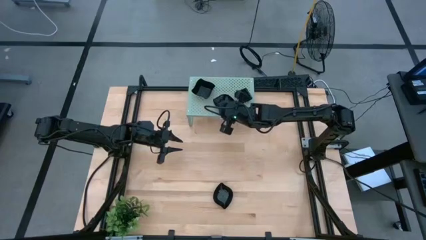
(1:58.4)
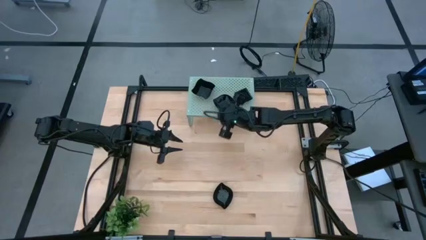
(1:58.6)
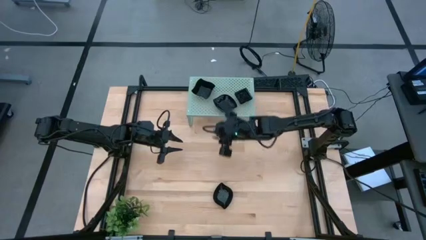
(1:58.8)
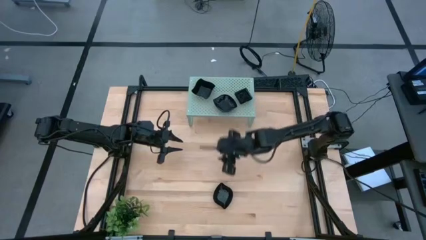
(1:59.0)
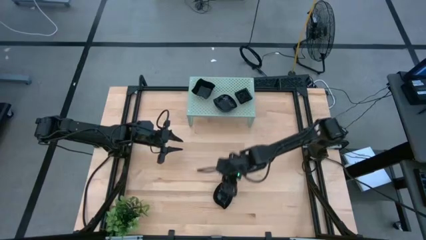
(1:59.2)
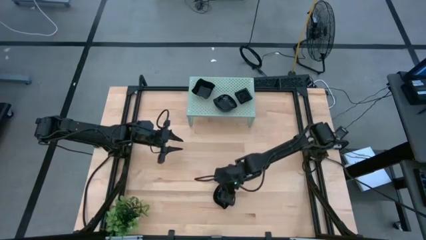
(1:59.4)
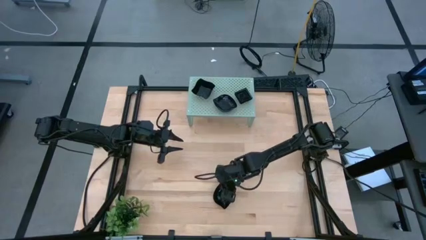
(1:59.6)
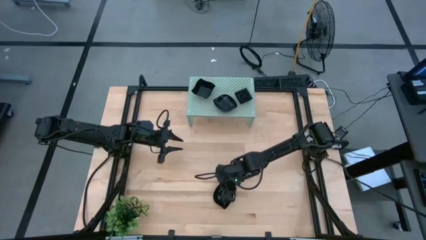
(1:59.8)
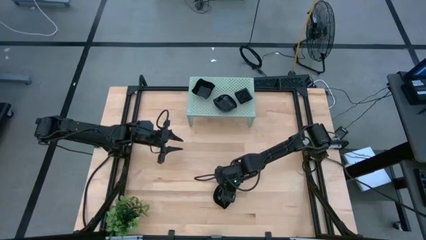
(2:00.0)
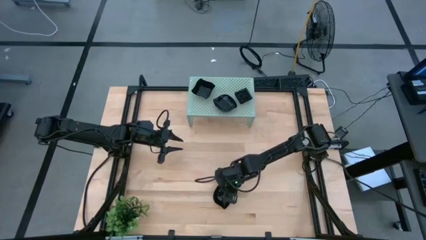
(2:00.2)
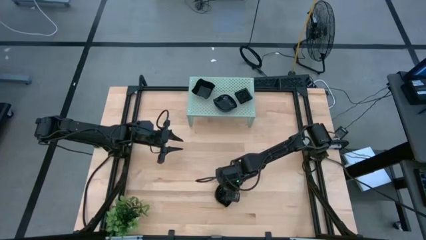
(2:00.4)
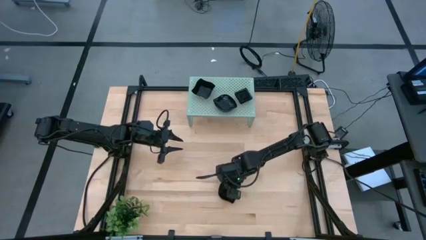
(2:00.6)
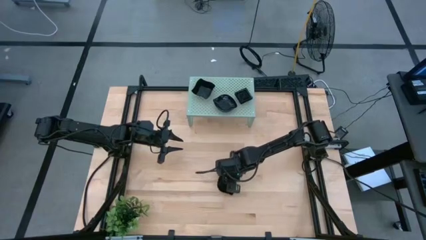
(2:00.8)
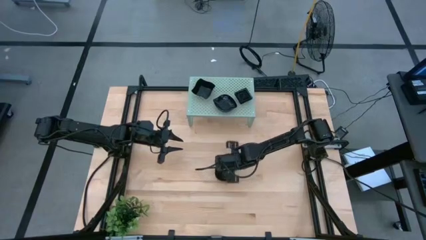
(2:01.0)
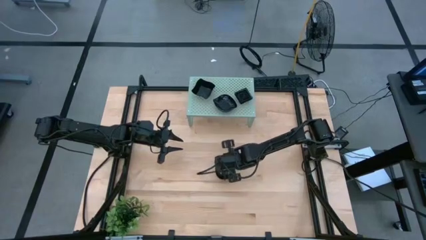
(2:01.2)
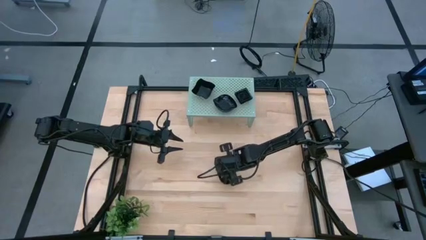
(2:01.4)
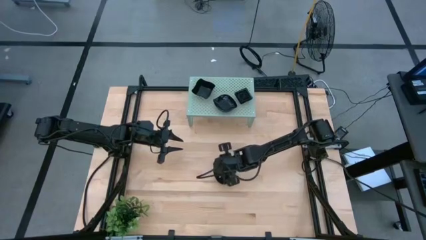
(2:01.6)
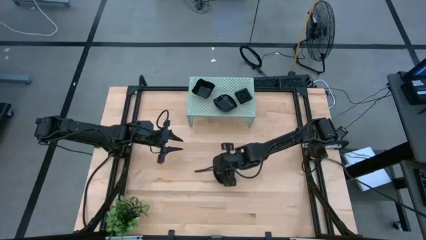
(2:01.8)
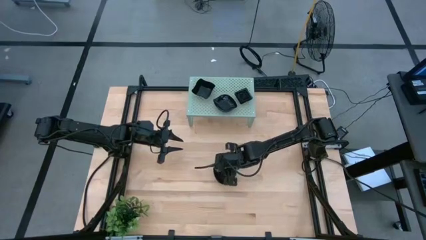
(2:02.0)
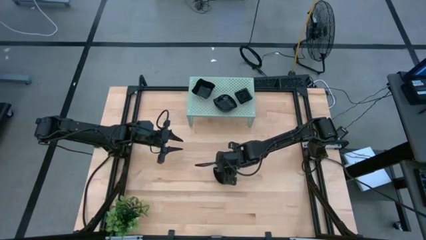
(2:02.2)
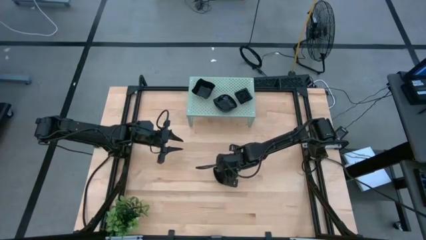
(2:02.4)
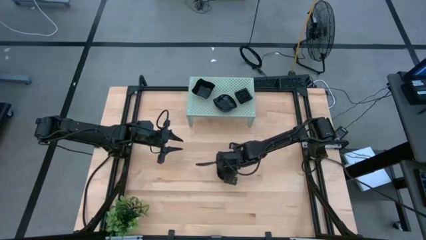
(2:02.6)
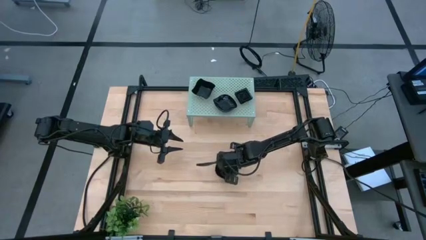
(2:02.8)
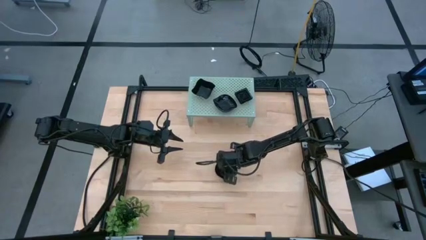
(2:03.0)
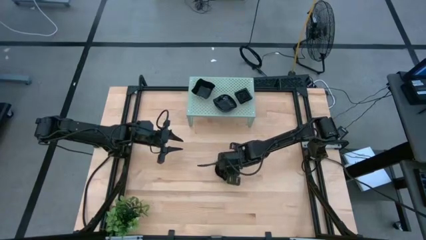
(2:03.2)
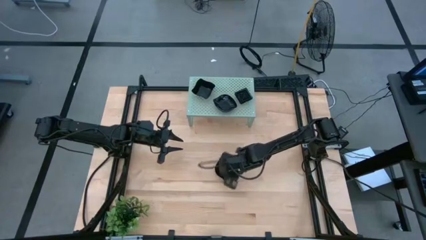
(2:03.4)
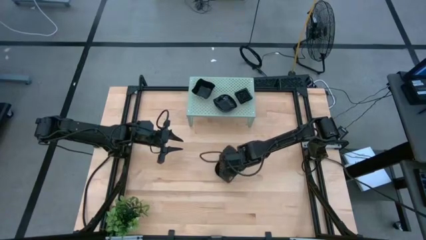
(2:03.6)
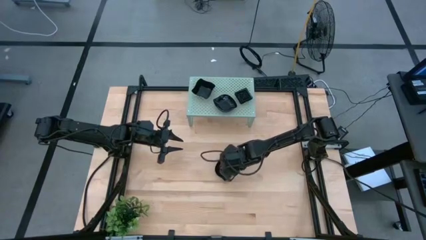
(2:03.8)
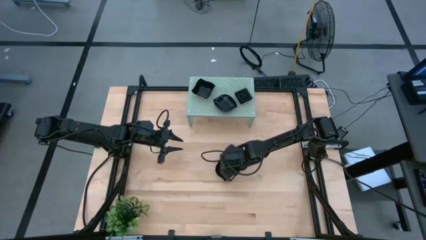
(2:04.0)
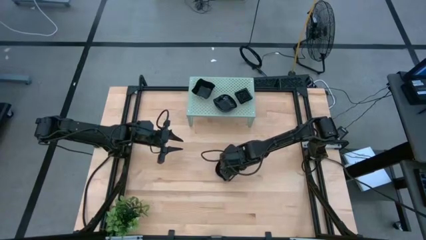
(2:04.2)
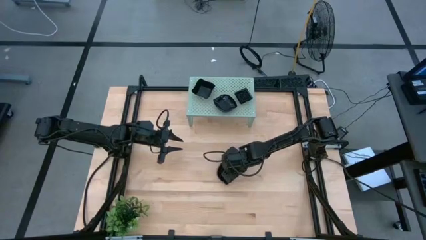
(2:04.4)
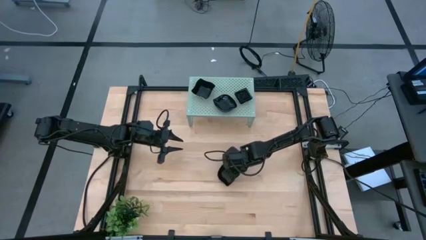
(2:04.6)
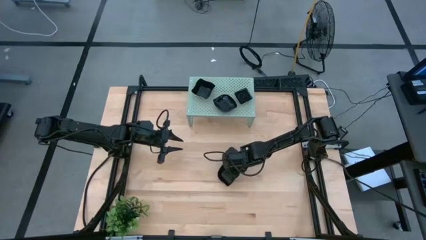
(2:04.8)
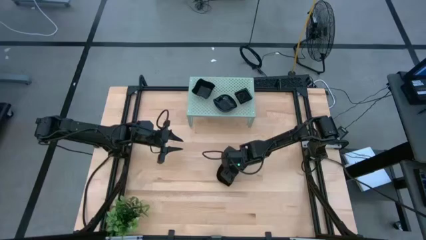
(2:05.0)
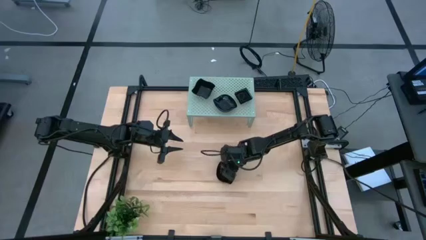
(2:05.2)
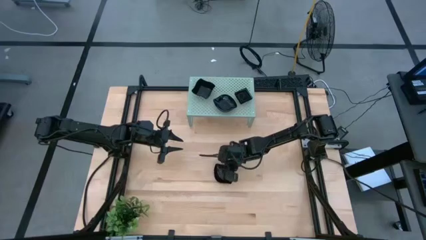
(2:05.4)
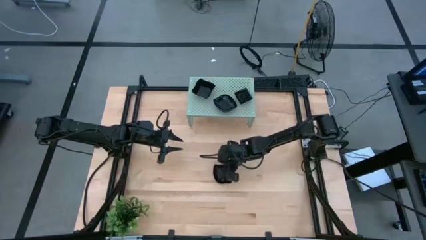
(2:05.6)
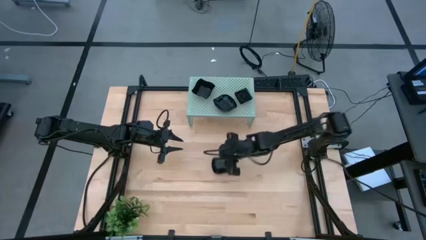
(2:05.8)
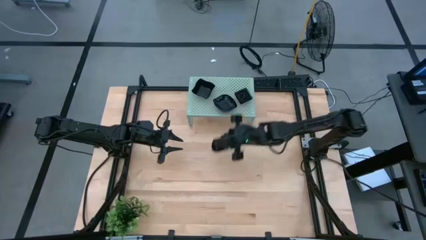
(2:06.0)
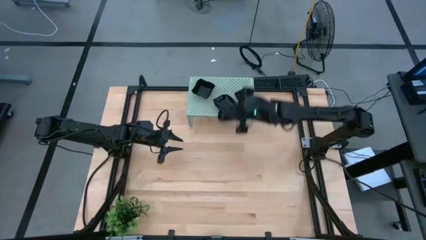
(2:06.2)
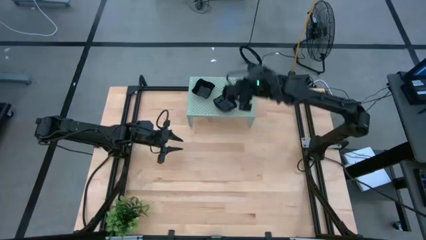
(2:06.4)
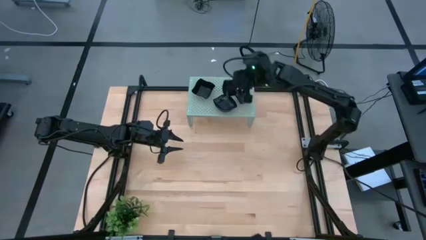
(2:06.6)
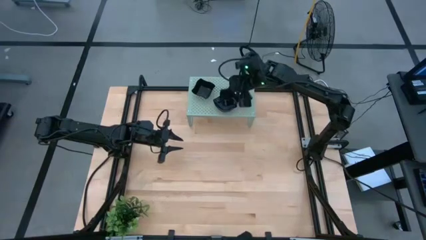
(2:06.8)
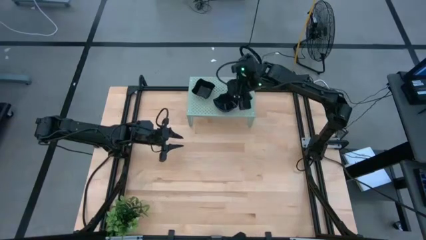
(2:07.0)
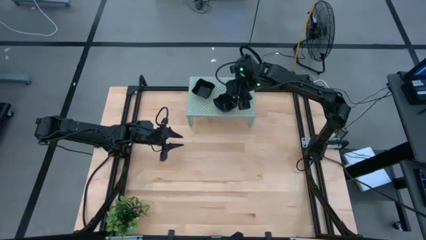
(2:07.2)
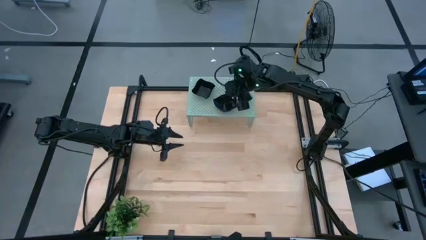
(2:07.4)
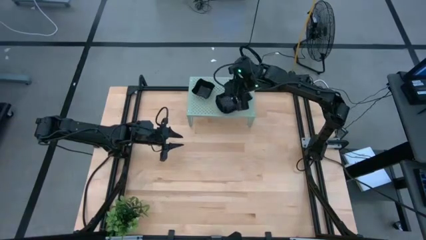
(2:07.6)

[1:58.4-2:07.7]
Task: Pick & Place Mini shaped plates
Stack the black leaf shaped plate on top of the other black leaf shaped plates on the shelf

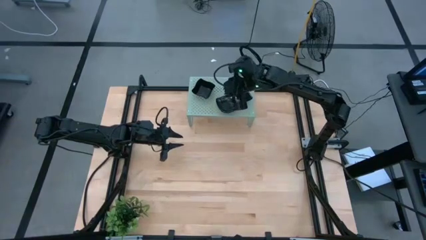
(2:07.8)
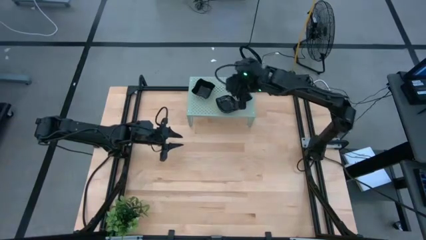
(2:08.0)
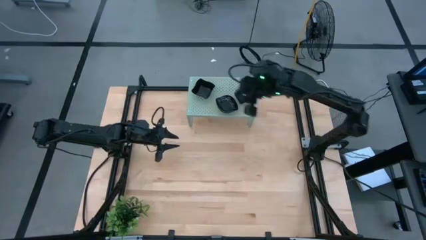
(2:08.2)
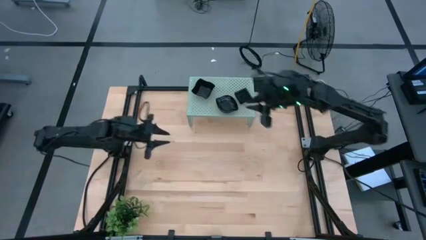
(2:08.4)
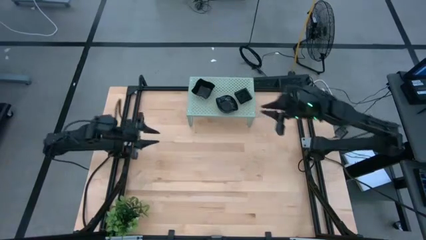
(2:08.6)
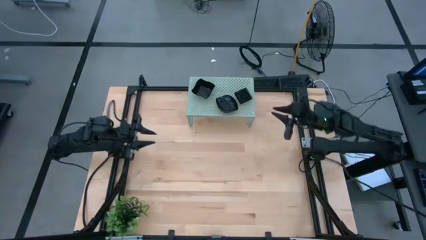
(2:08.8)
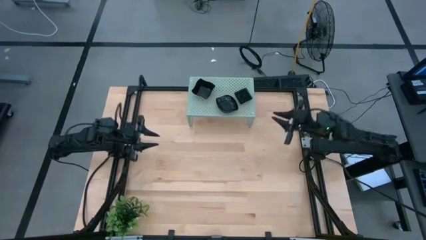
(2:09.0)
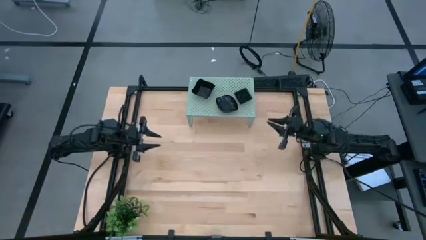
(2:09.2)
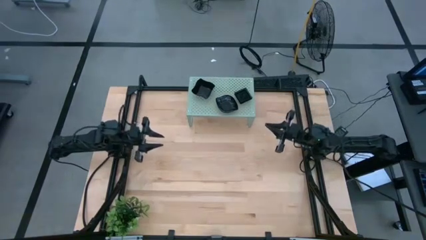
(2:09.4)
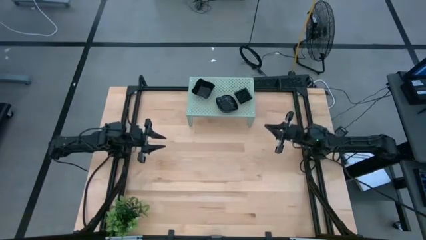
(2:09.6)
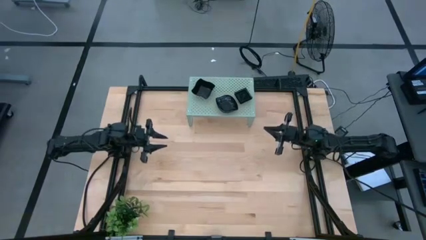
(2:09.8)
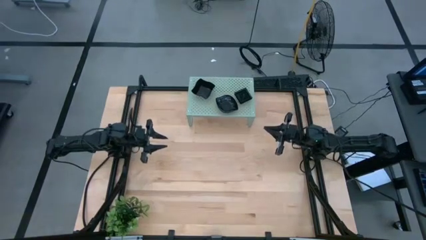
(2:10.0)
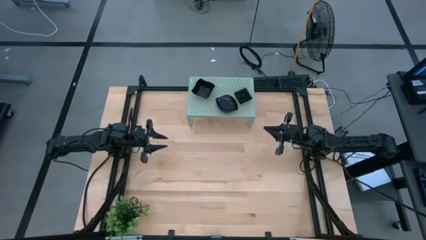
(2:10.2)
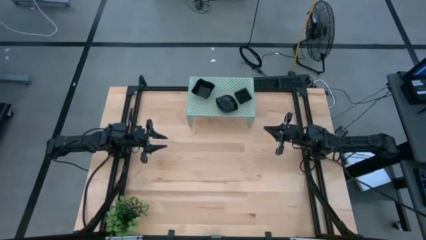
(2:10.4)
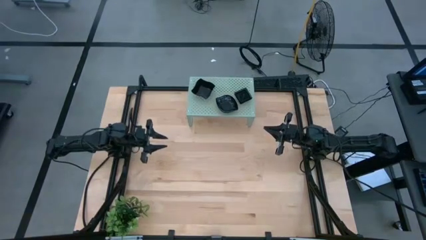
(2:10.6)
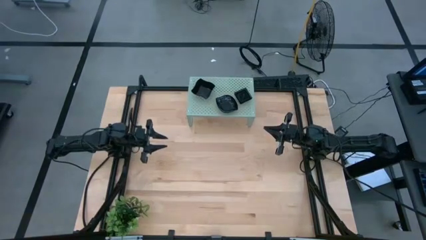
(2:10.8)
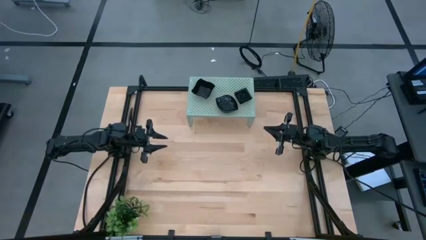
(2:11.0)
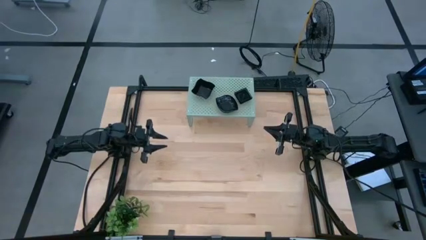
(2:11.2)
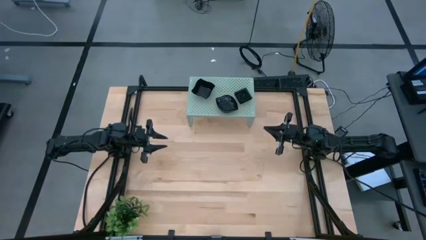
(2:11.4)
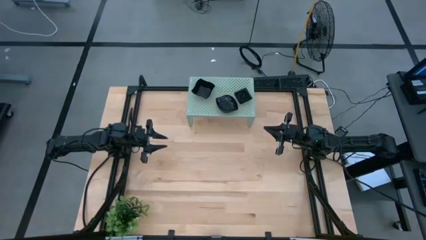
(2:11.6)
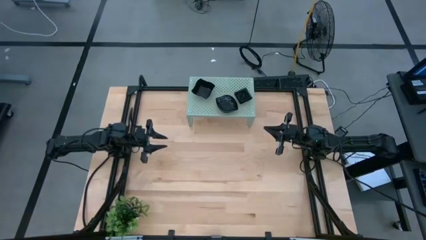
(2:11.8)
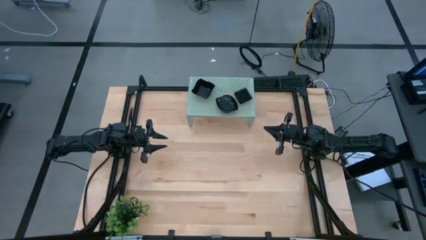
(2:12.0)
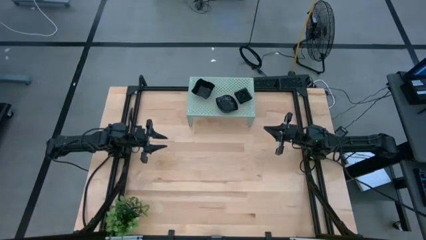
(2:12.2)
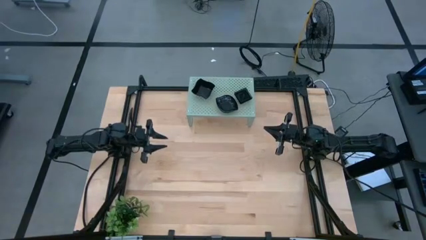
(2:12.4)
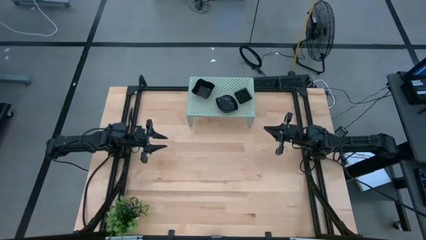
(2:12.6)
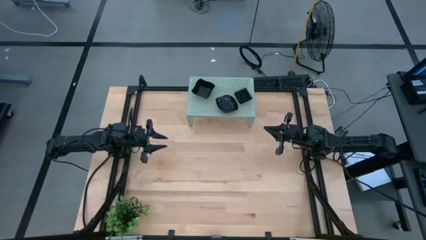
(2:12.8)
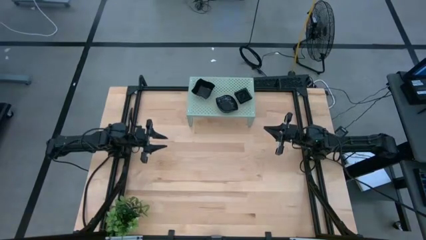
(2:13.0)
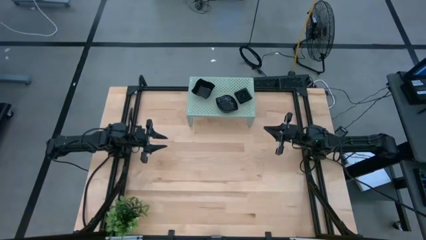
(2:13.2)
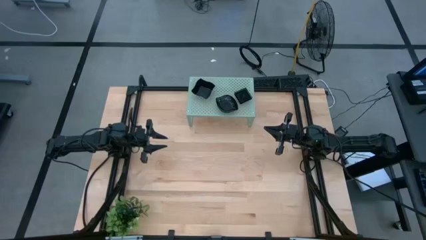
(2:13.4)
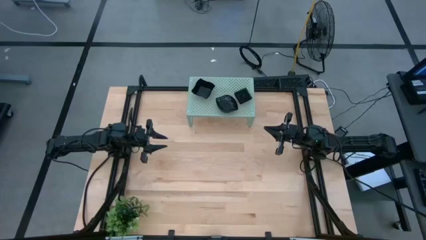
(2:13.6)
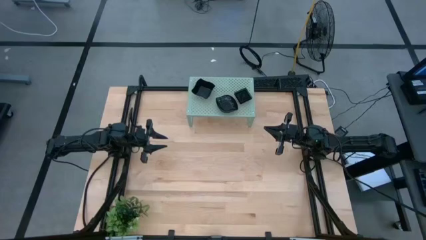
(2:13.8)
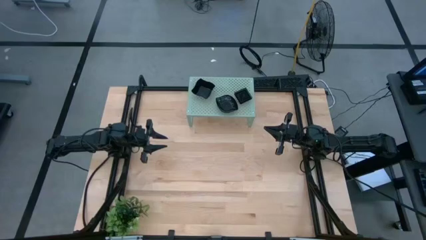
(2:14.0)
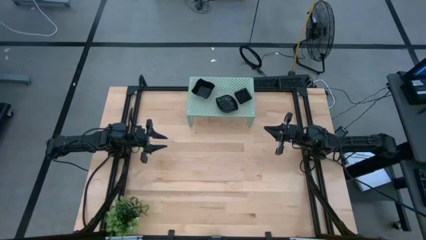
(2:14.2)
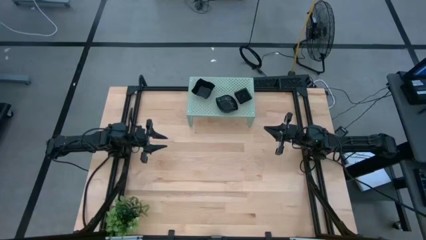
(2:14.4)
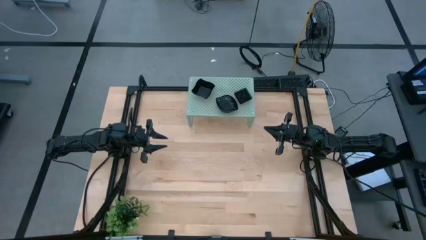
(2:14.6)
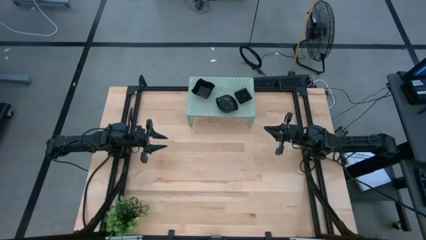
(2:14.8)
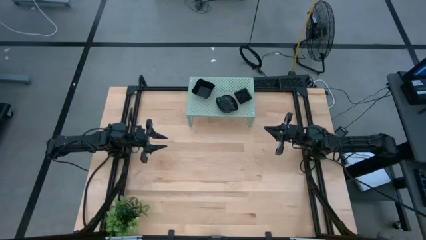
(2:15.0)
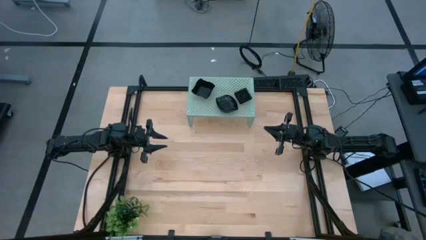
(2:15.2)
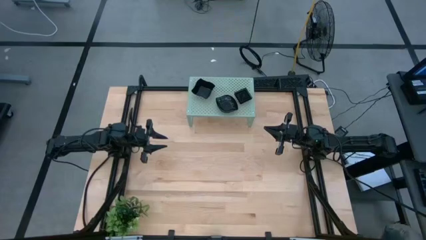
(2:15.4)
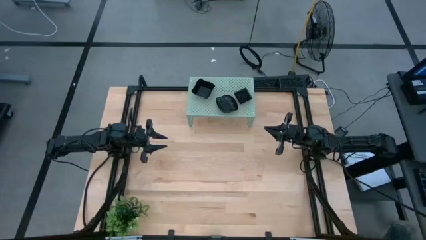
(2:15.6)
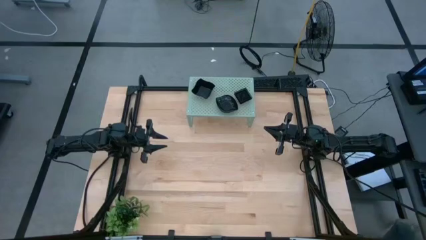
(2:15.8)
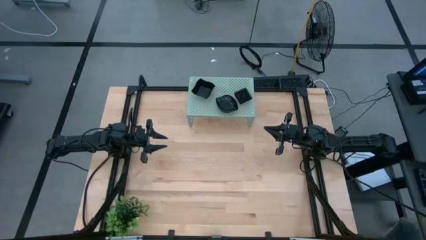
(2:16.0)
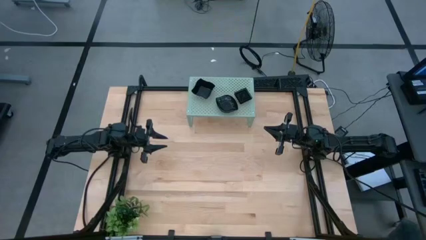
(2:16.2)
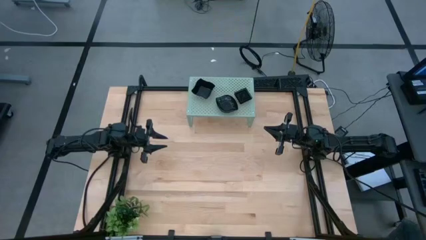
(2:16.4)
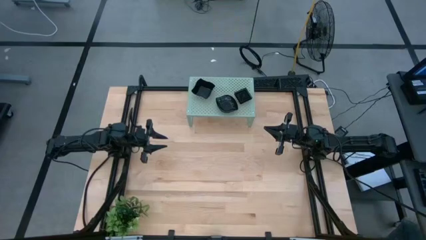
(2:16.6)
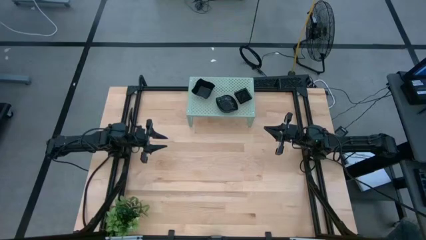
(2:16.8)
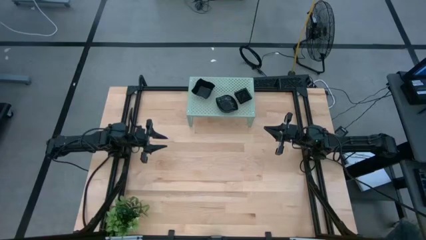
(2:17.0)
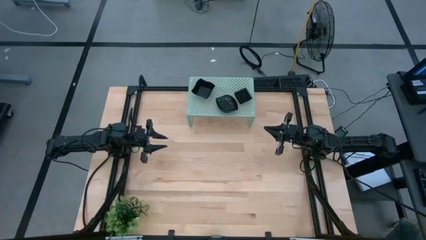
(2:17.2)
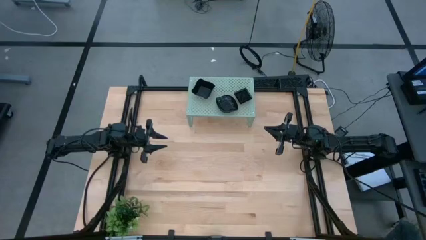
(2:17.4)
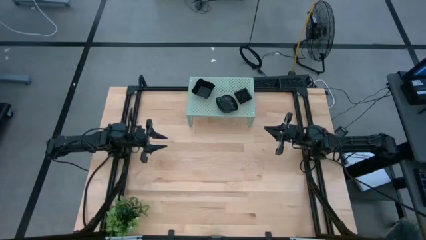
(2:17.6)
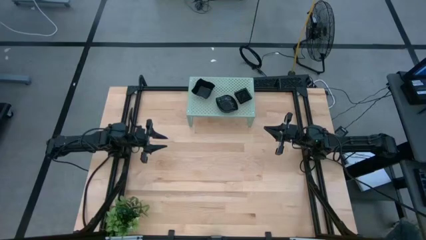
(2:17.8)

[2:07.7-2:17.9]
Return to Home Position
